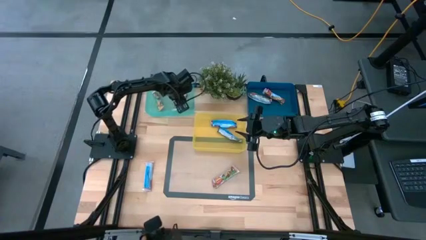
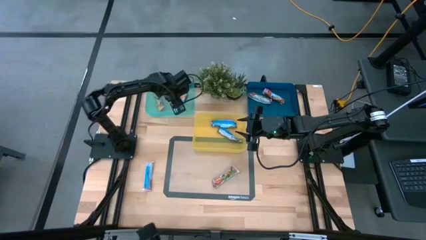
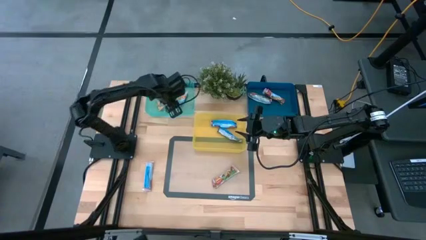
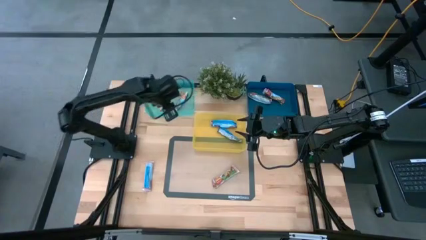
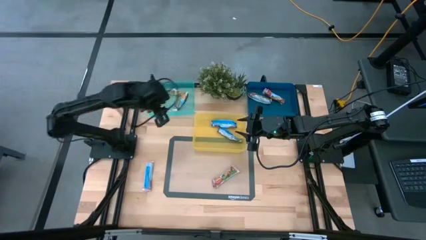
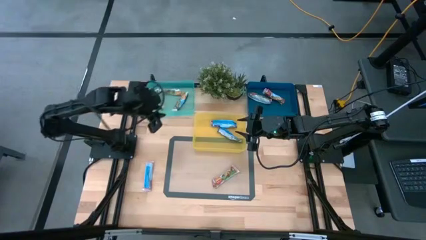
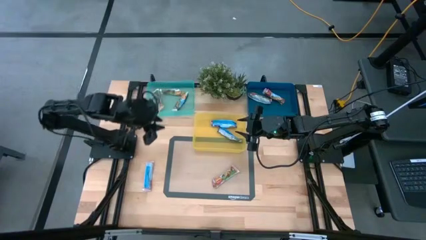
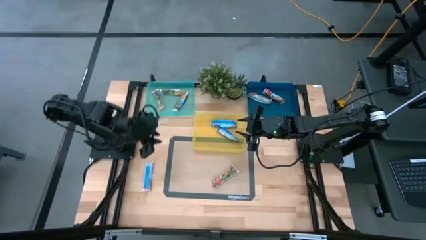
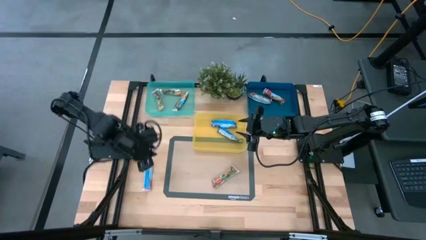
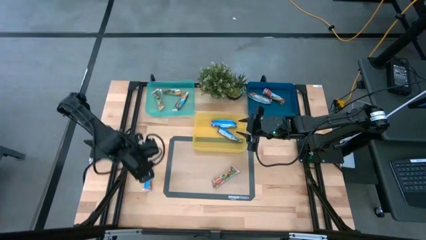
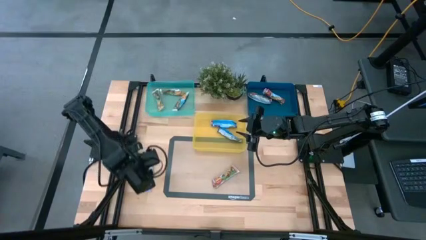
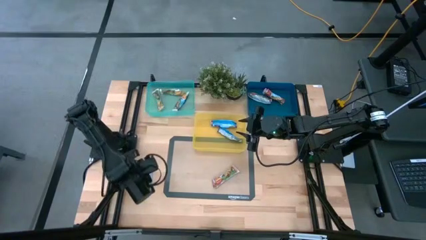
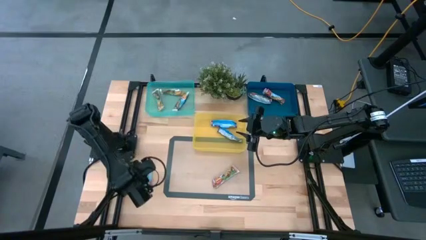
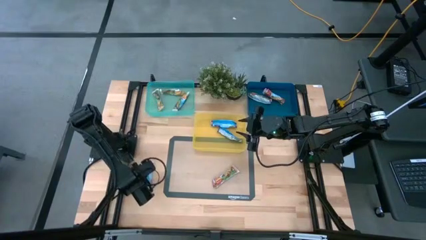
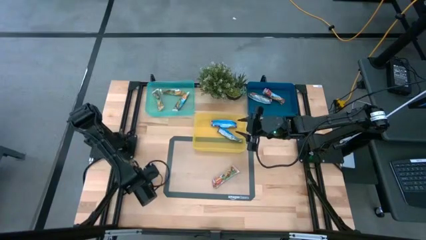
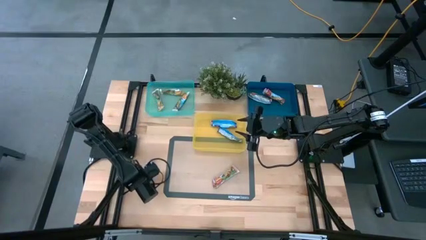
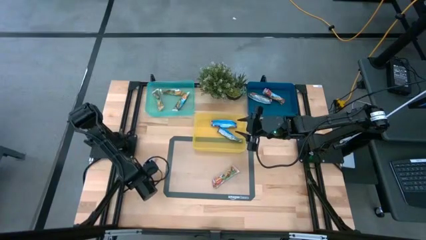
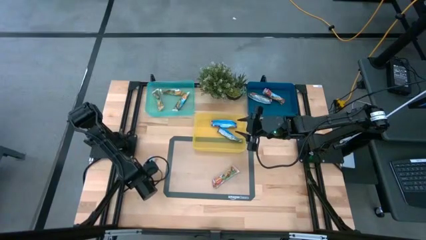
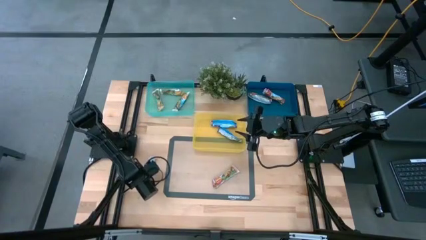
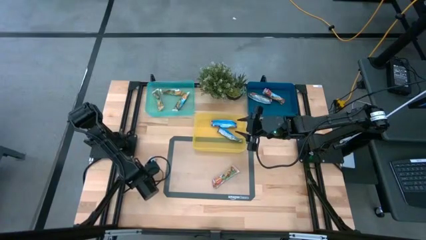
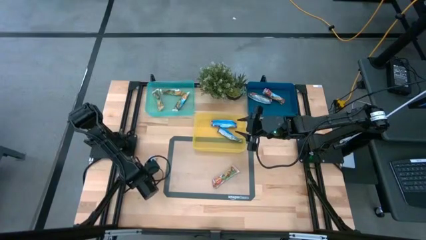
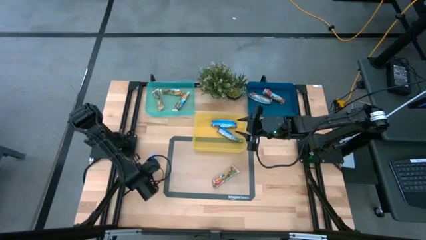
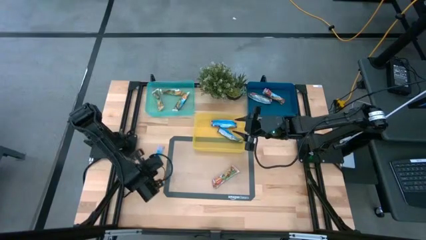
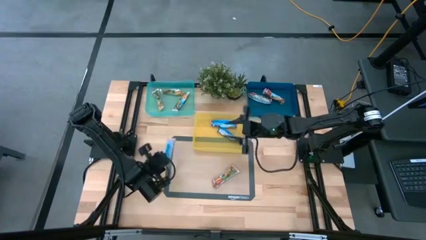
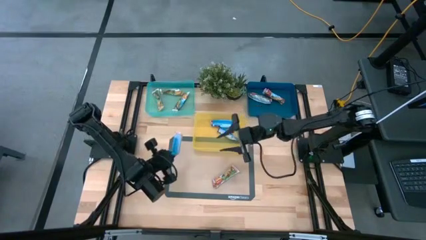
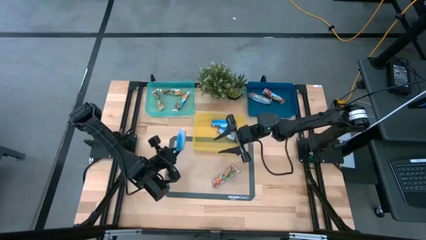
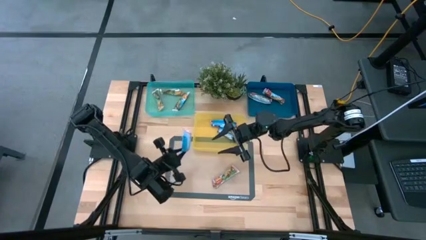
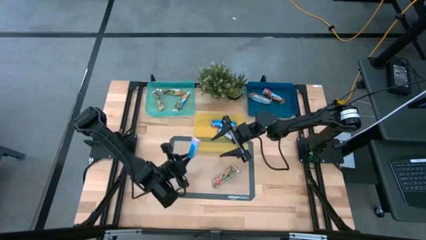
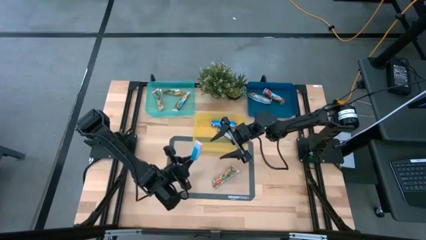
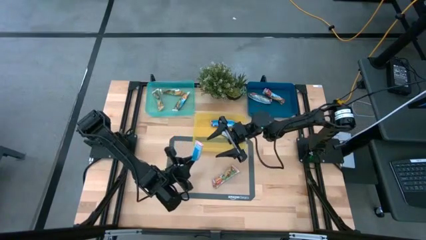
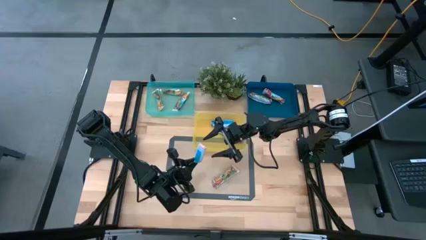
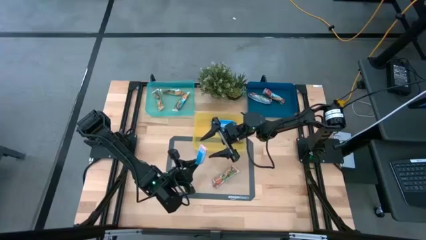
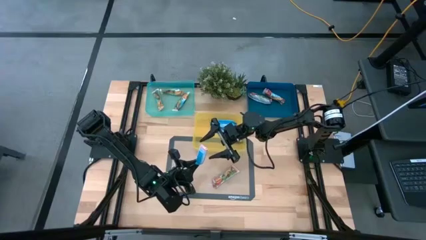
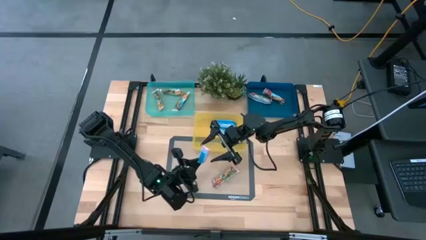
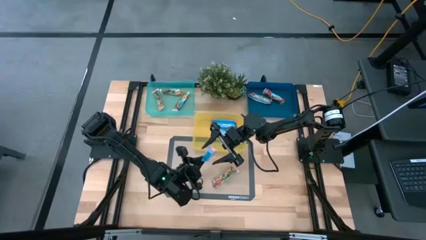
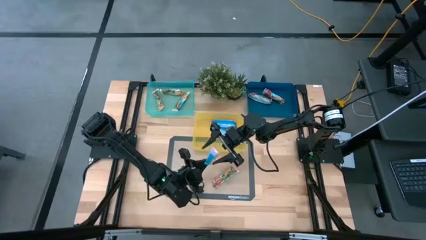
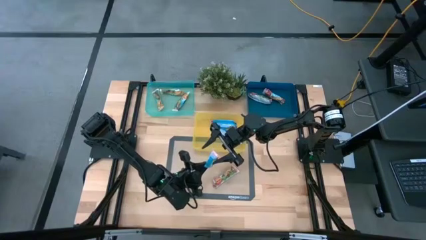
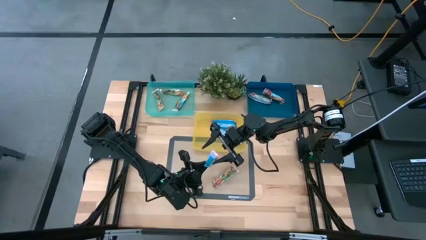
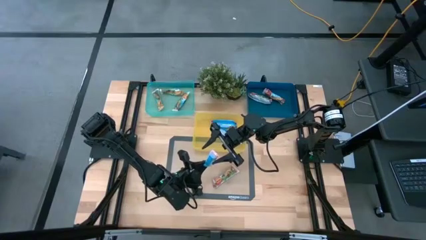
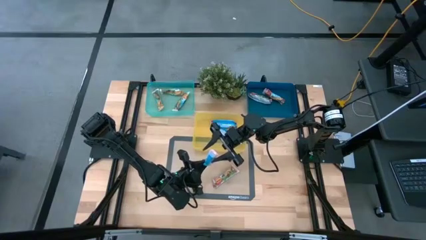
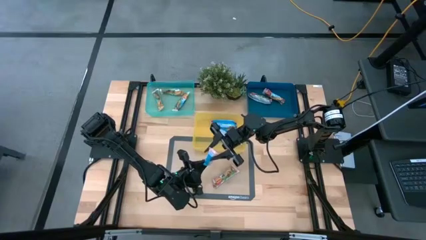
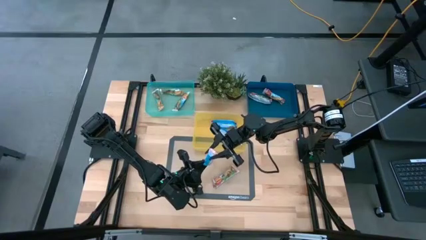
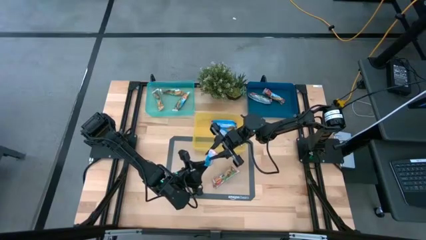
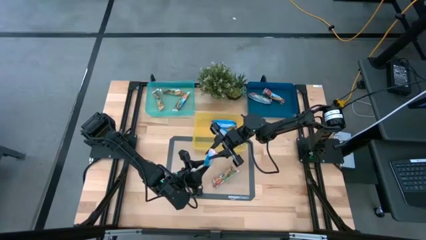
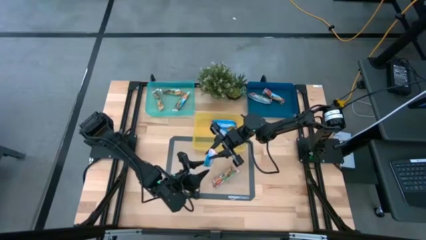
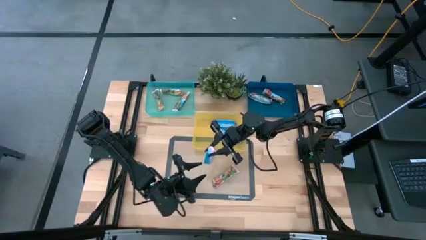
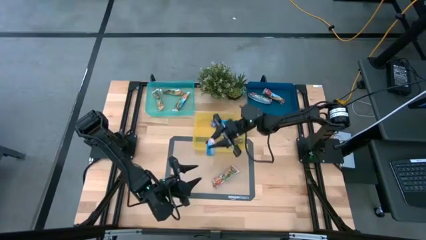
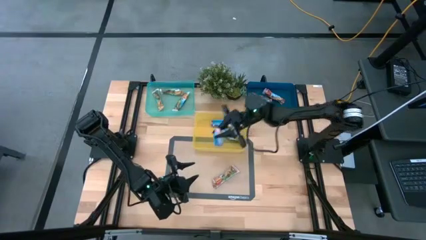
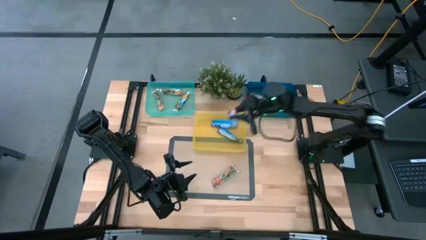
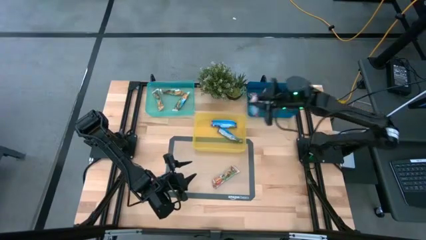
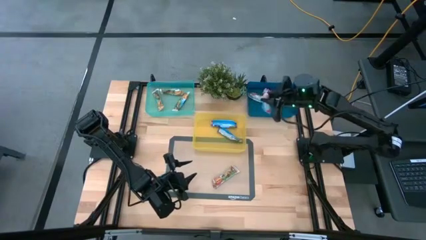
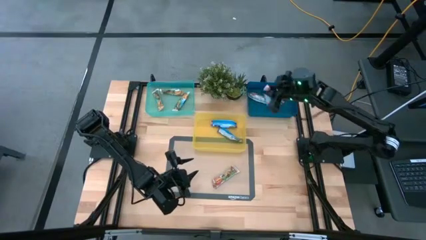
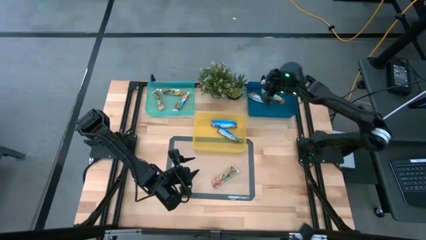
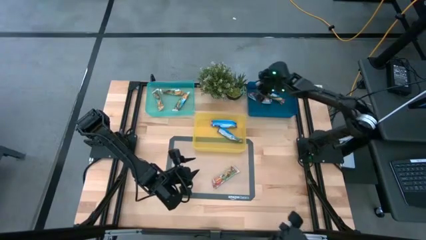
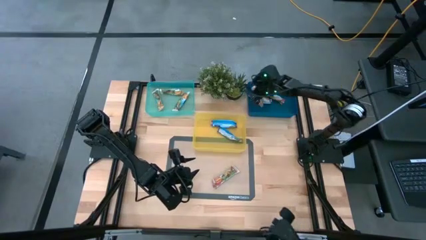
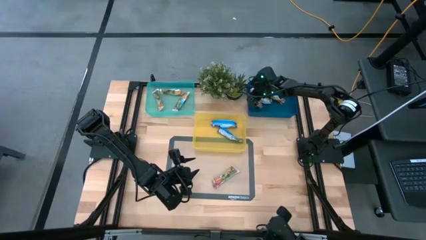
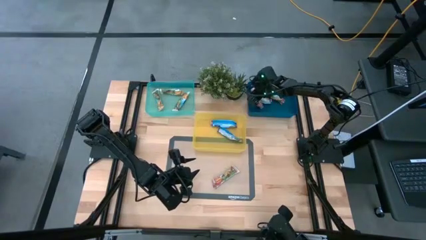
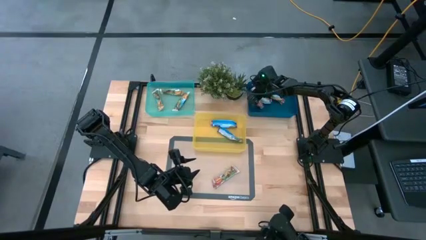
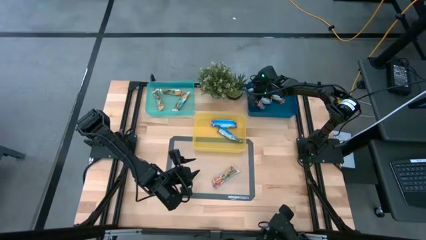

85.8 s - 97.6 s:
Task: Pick and place Granola Bars by type
Put the red granola bar into the blue bin

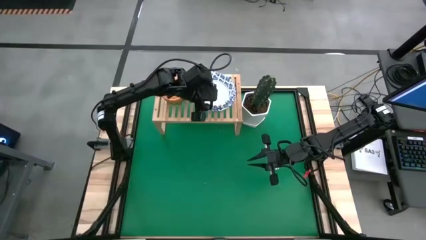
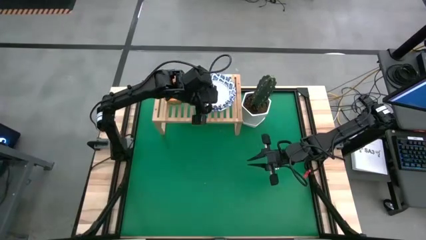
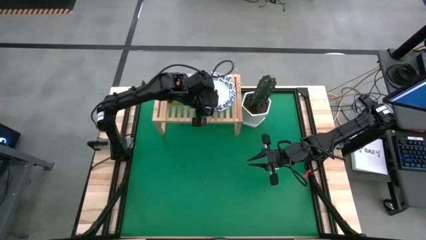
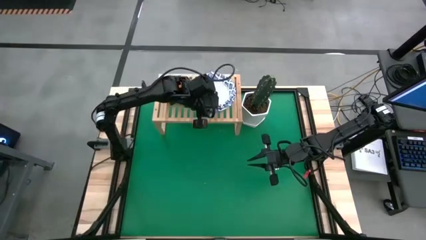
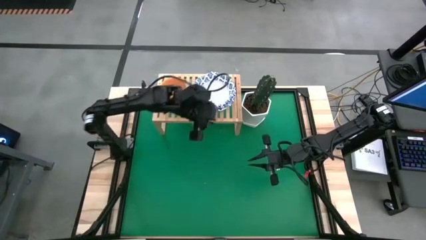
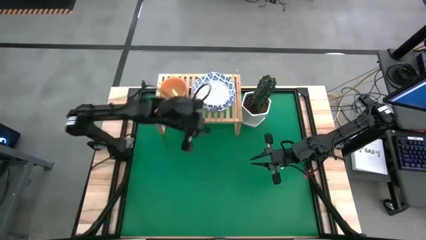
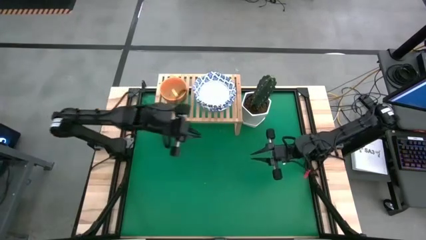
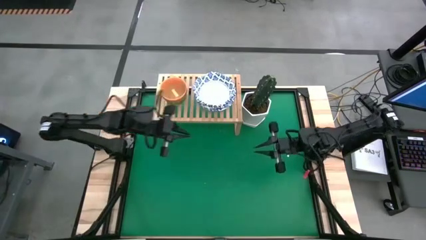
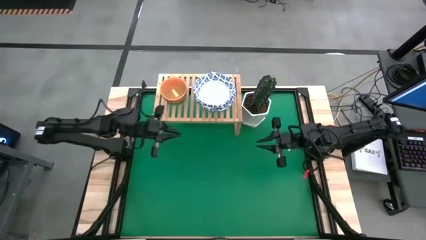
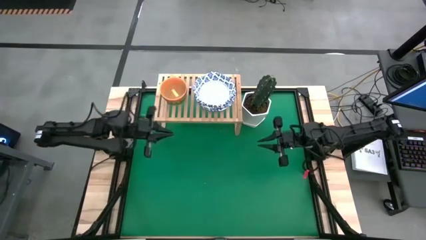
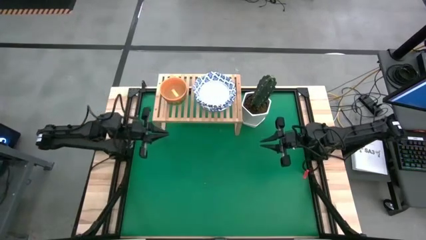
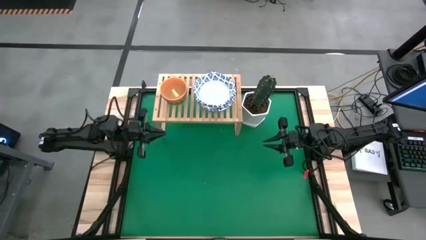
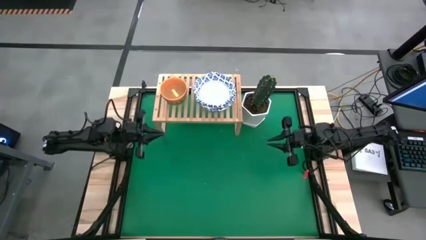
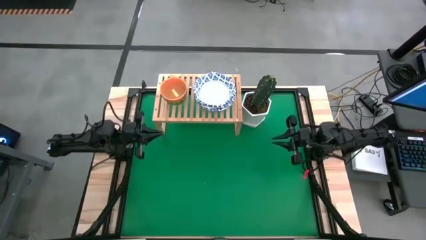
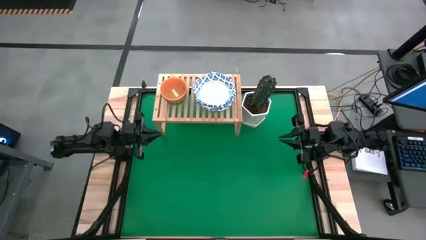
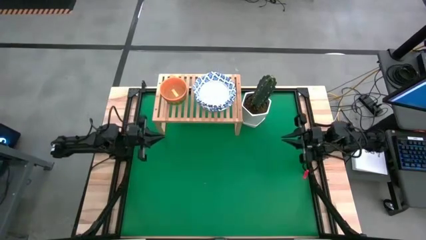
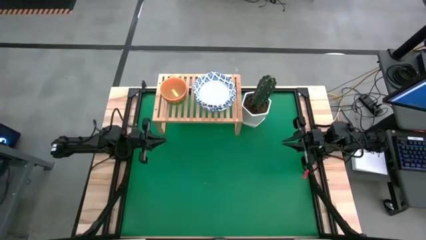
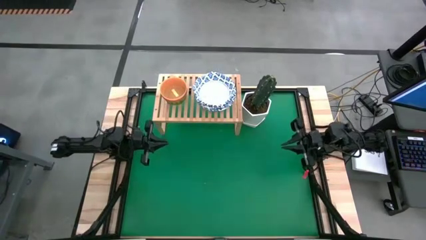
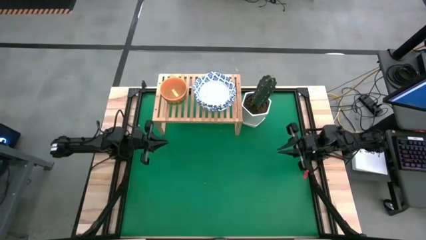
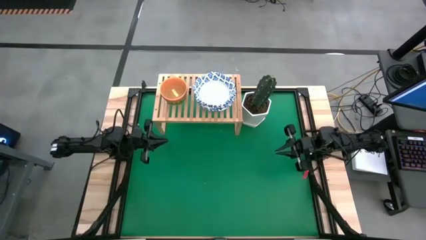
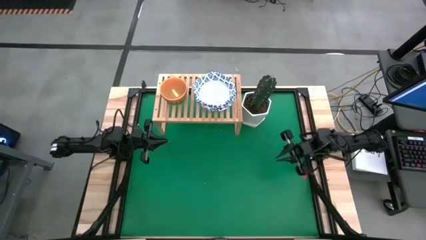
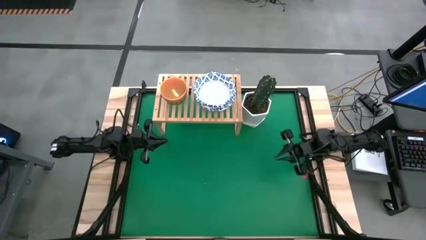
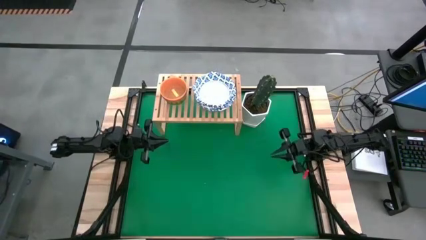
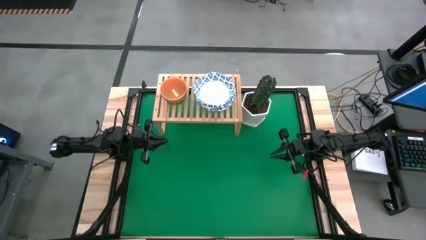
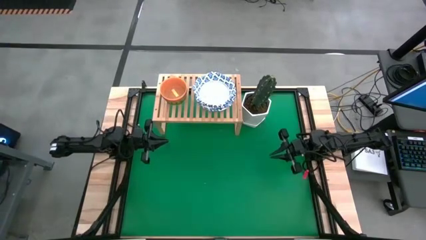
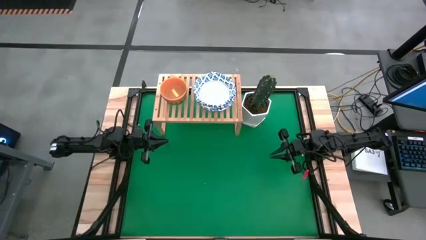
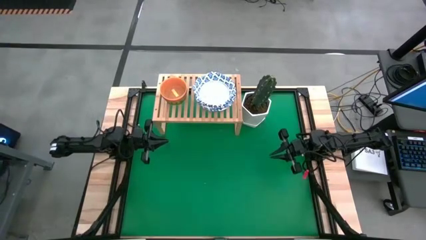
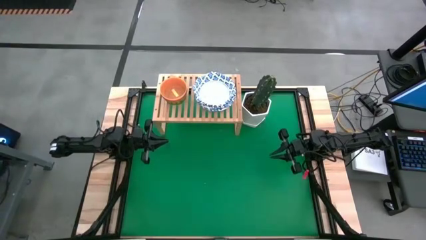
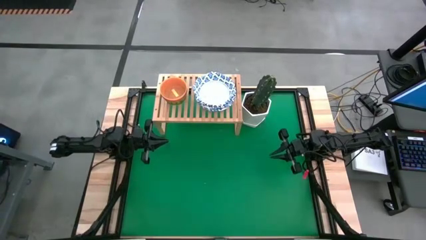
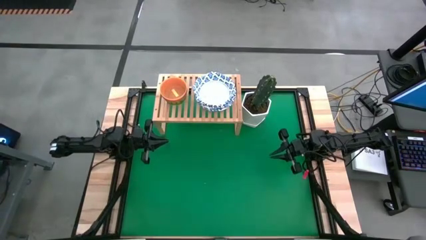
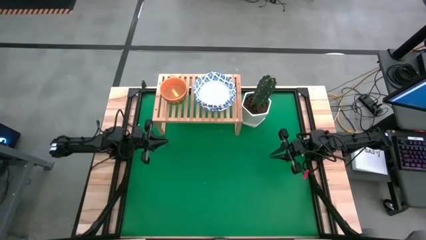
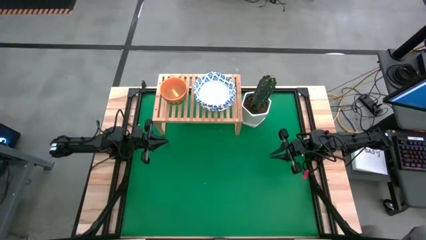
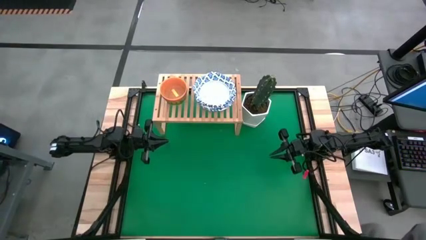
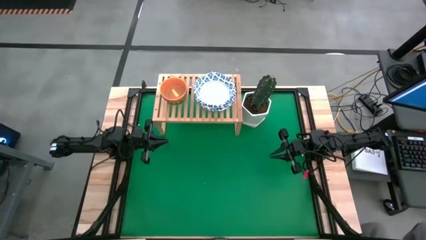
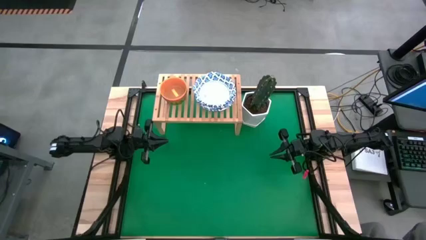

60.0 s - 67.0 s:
Task: Place and stack bowls onto a shelf
Return to Home Position
